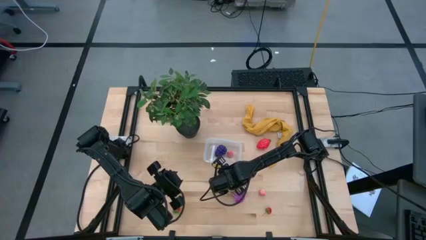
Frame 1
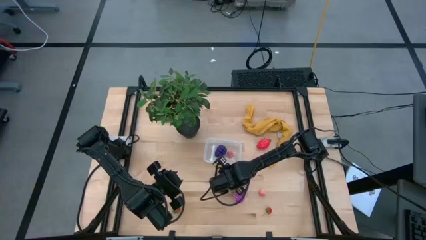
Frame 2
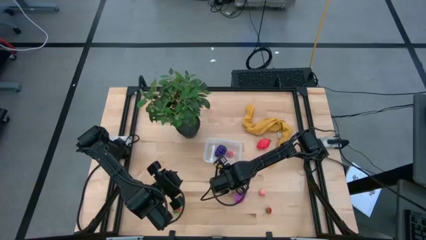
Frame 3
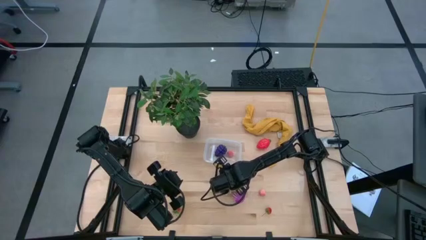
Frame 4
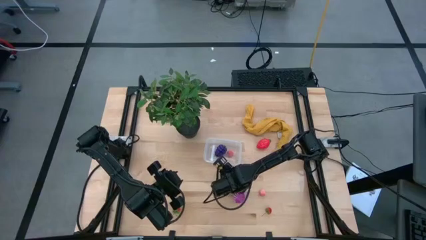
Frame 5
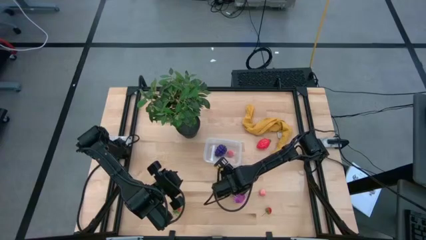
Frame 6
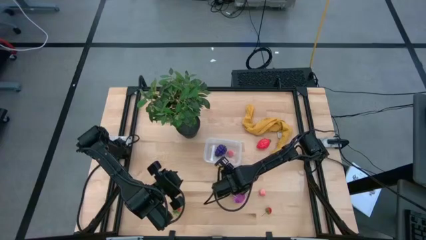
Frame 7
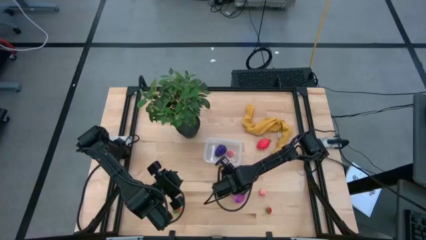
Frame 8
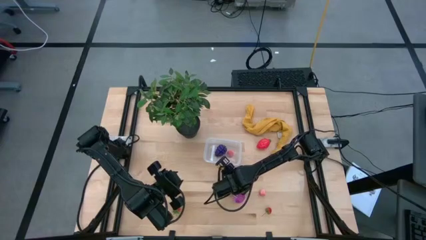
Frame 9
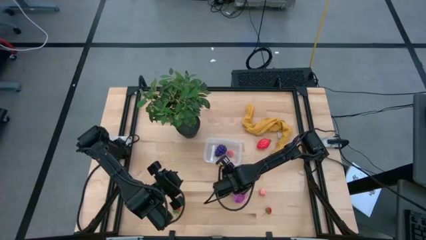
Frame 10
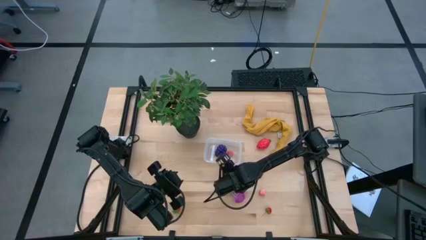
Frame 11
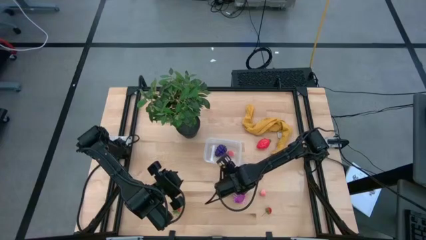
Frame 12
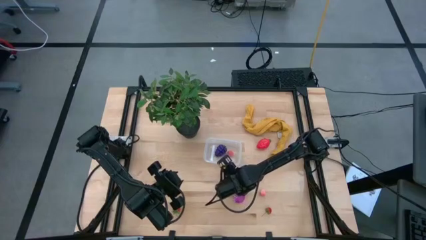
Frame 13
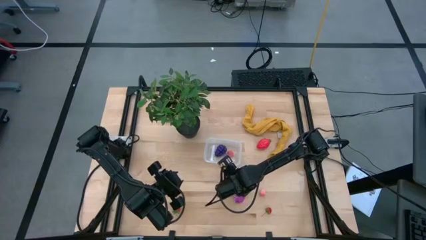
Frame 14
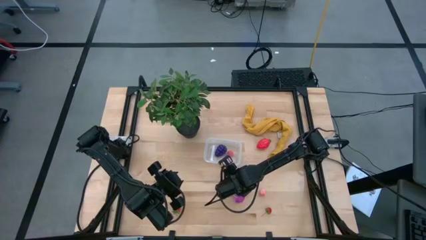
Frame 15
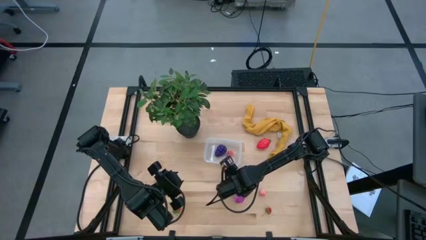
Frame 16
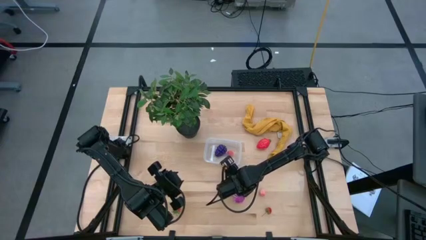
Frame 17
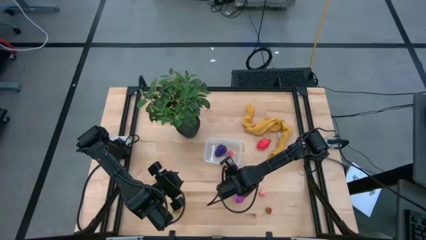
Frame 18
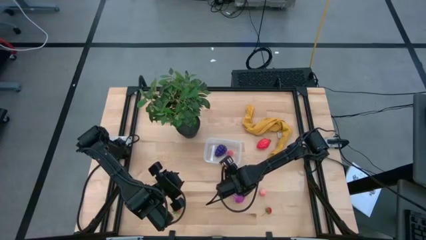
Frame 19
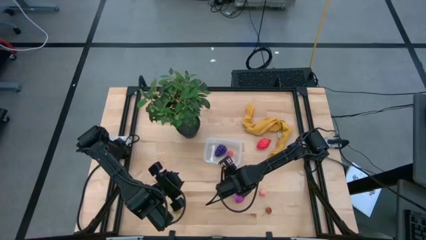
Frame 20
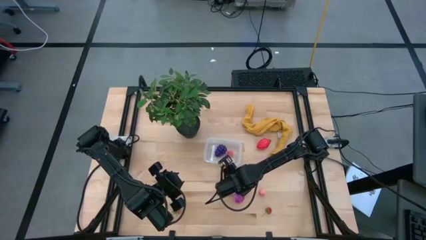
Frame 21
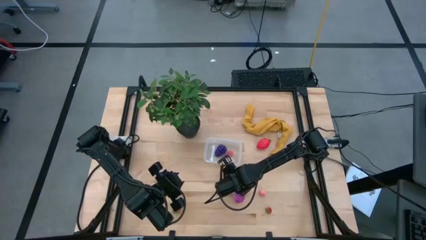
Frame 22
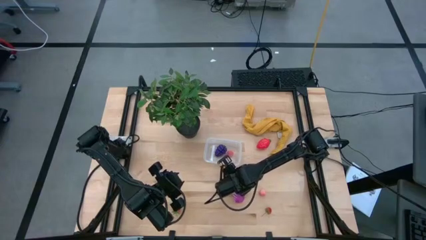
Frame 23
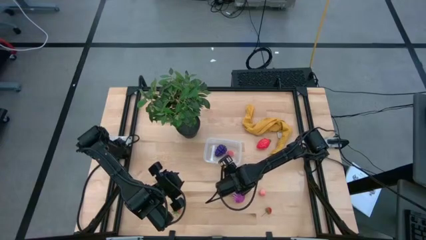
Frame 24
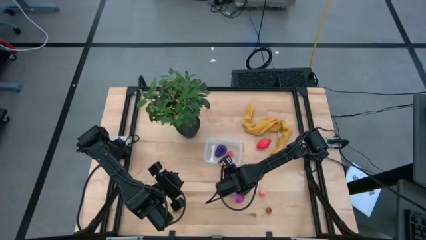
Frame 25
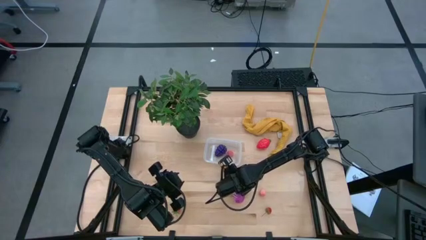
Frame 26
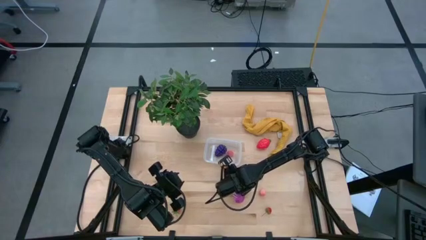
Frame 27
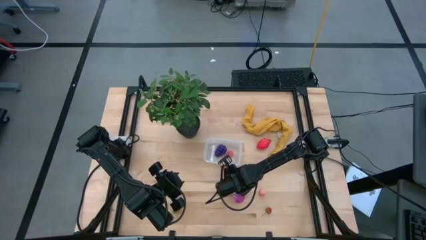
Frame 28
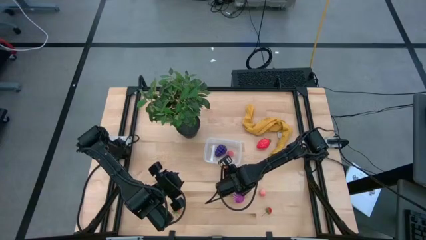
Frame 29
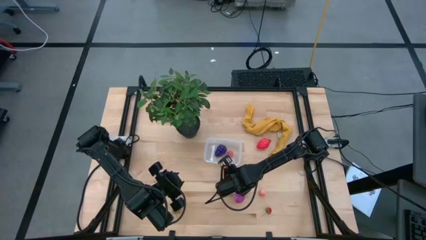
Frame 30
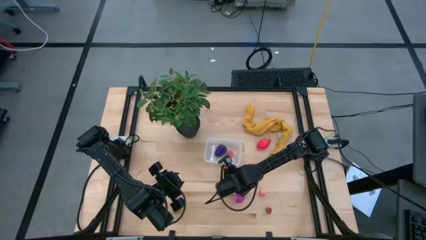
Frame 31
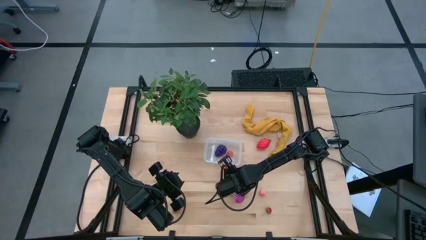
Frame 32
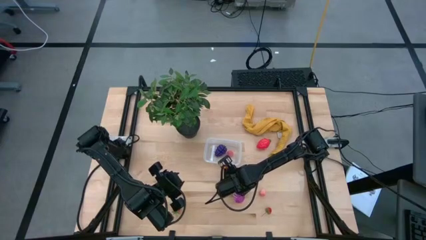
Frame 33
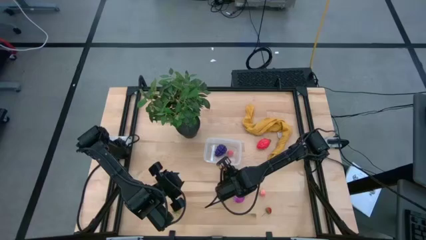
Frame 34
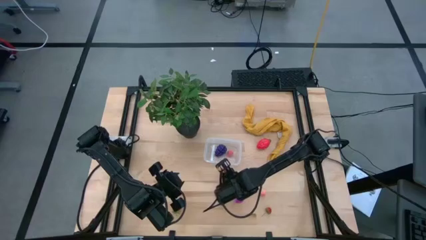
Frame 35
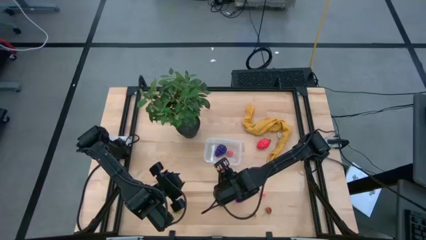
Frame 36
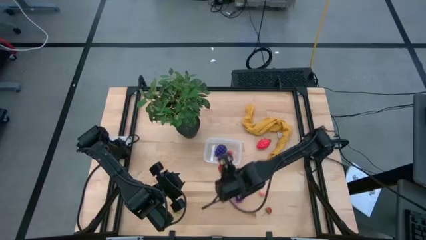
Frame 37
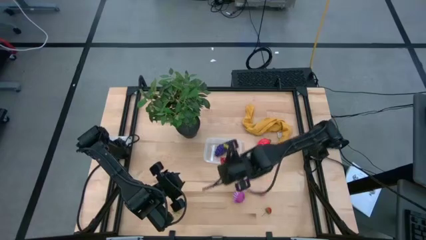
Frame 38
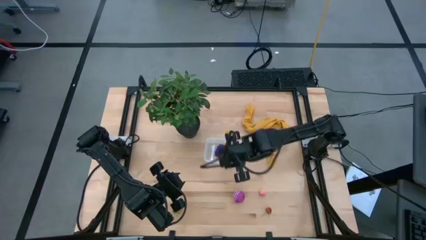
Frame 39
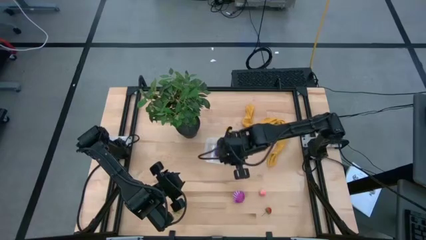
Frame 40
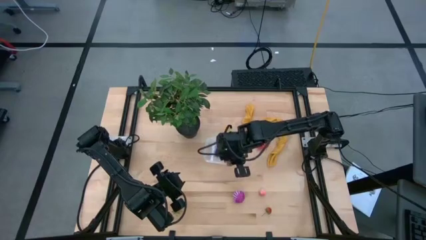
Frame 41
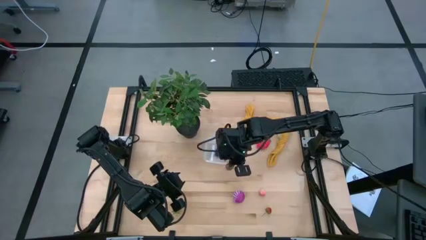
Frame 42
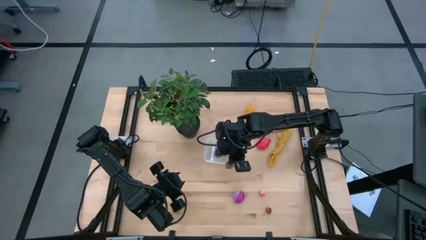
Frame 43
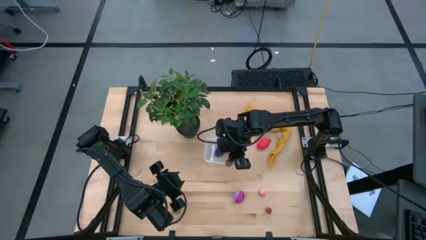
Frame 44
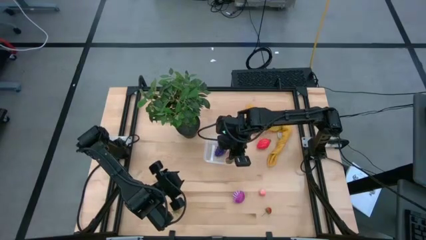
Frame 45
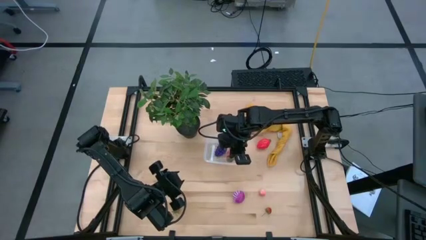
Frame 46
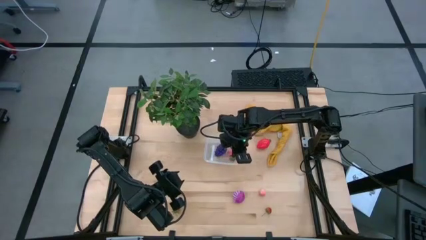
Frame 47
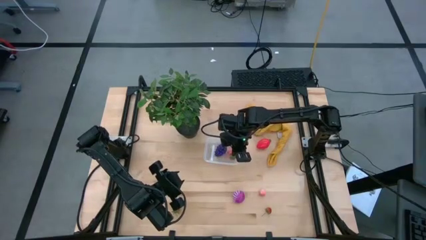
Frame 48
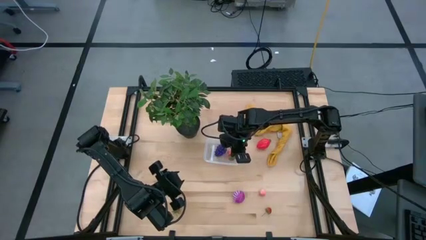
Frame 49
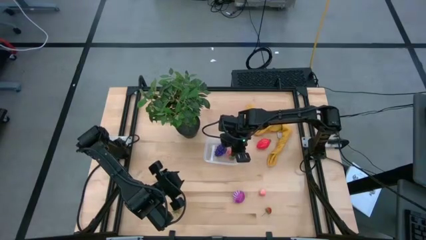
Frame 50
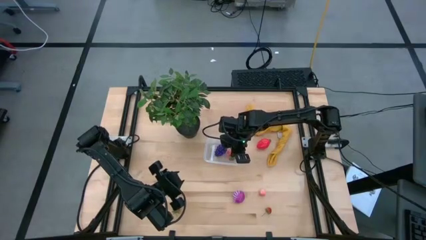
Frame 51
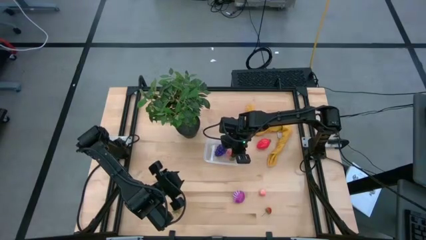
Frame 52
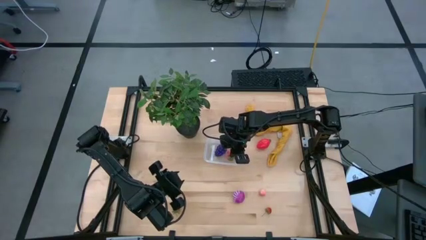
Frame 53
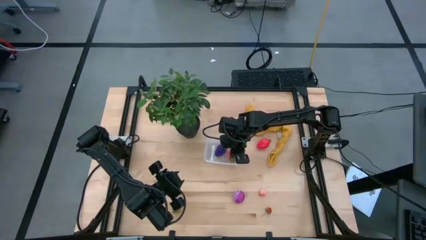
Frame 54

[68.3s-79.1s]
Task: Pick and placing Produce into tupperware
Put the middle strawberry into the bin

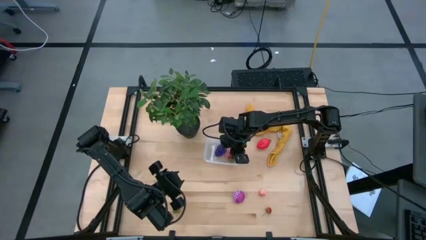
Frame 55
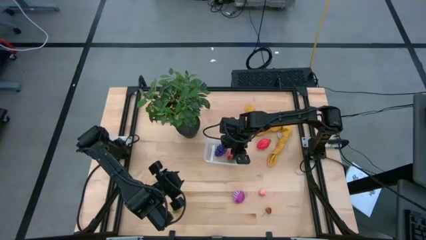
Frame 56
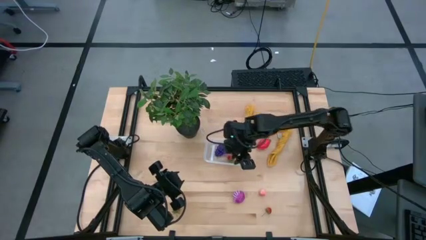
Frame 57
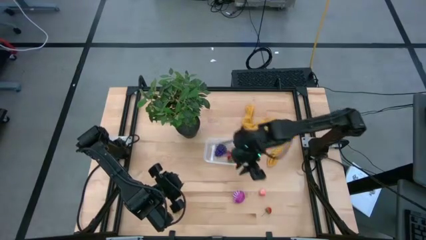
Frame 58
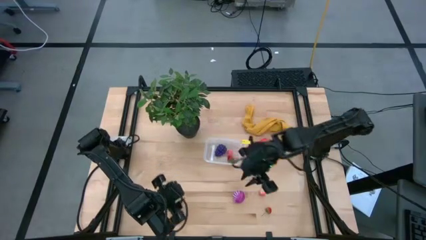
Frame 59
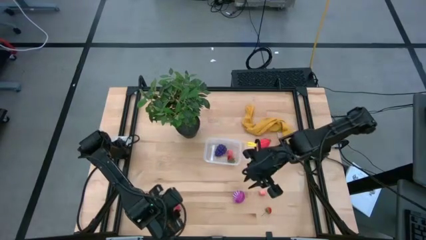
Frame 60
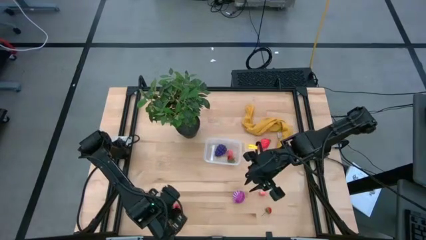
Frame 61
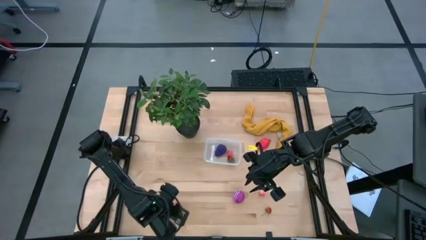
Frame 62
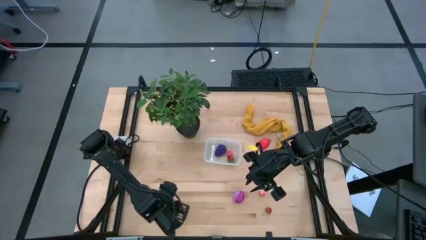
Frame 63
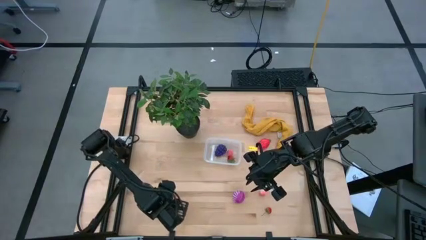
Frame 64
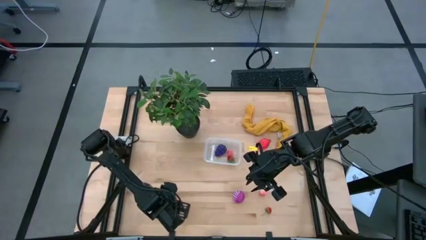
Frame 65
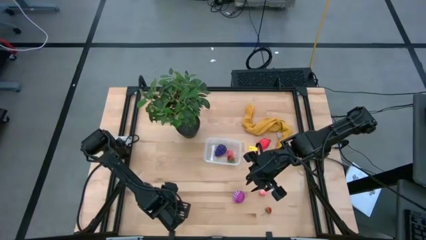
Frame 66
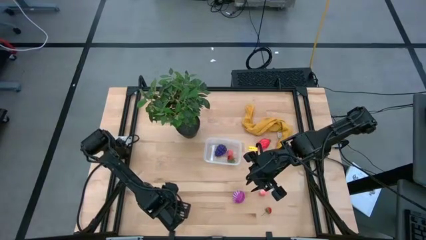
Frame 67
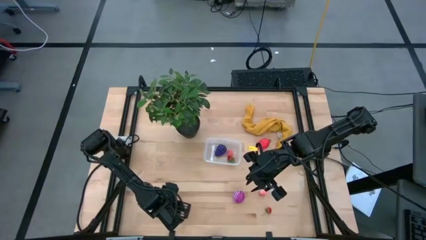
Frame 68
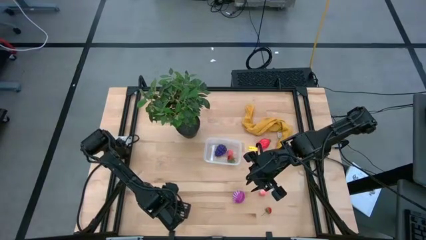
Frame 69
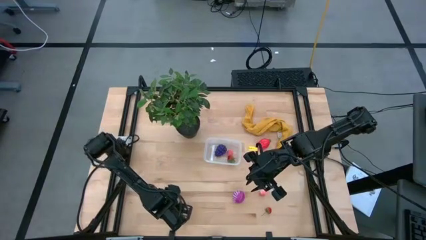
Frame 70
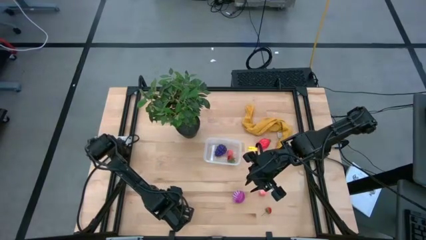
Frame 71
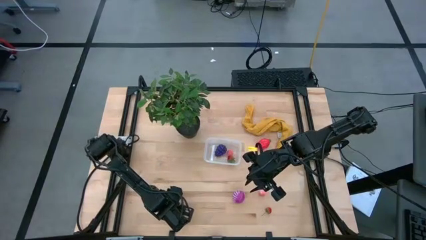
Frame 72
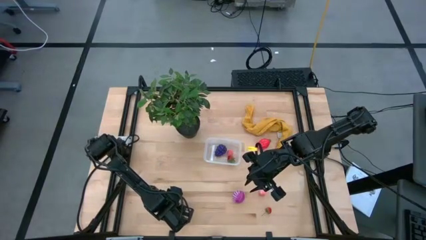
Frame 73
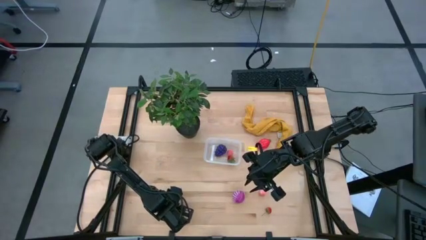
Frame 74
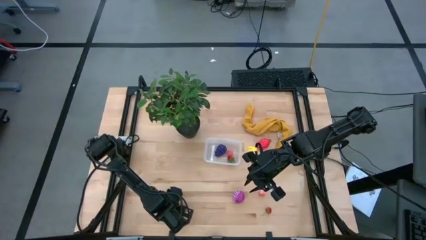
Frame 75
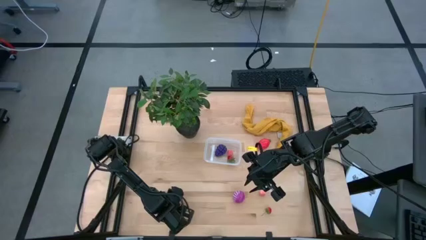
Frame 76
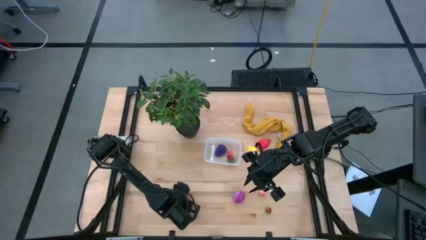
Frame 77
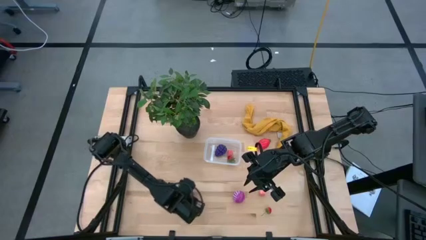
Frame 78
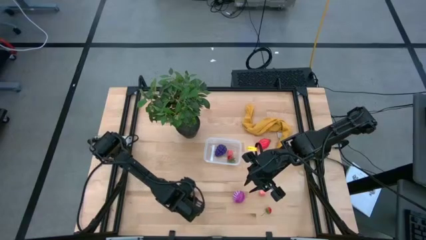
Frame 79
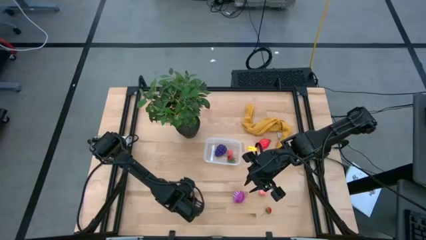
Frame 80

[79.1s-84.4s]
Put the left strawberry into the bin
